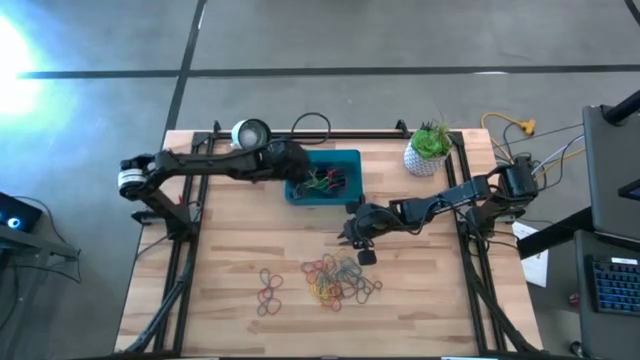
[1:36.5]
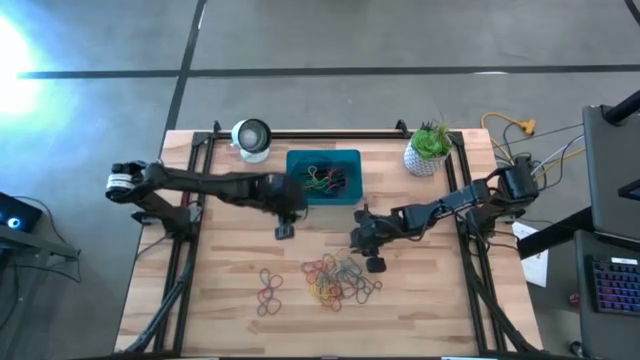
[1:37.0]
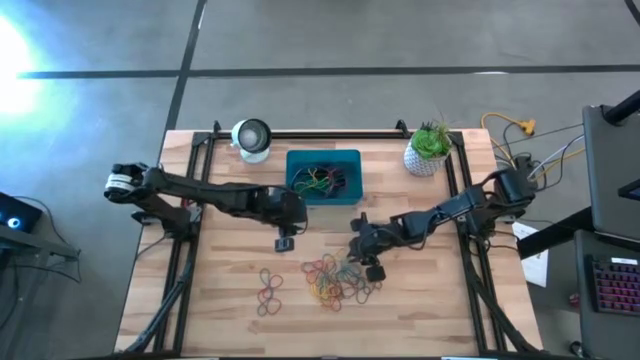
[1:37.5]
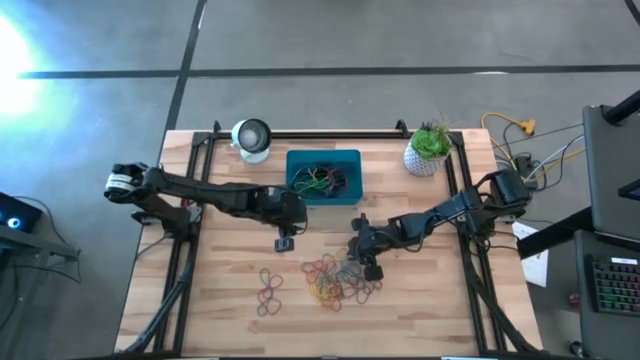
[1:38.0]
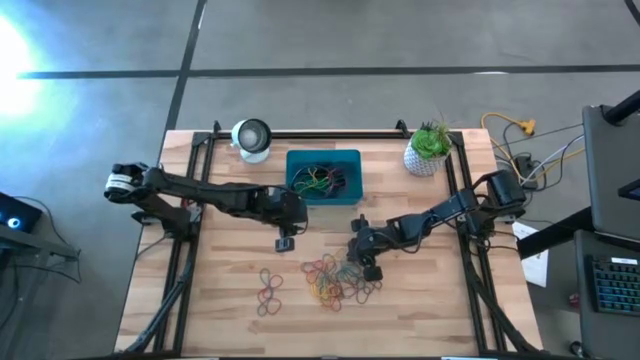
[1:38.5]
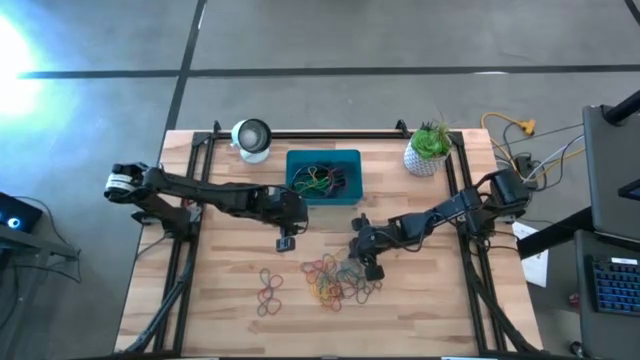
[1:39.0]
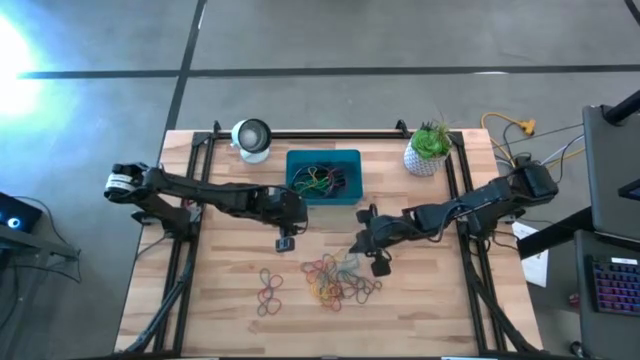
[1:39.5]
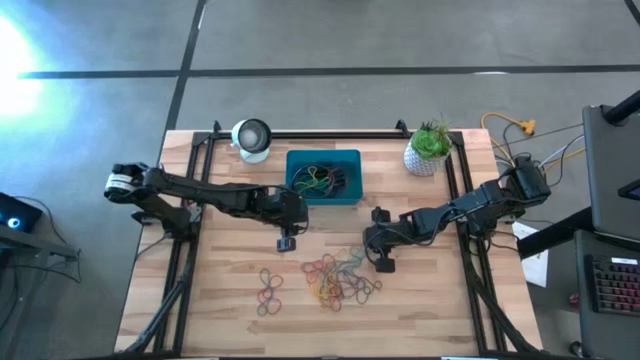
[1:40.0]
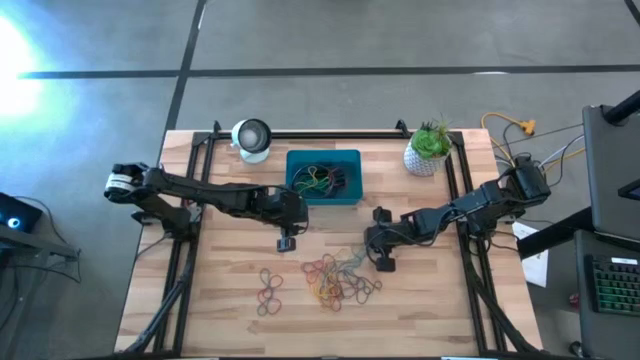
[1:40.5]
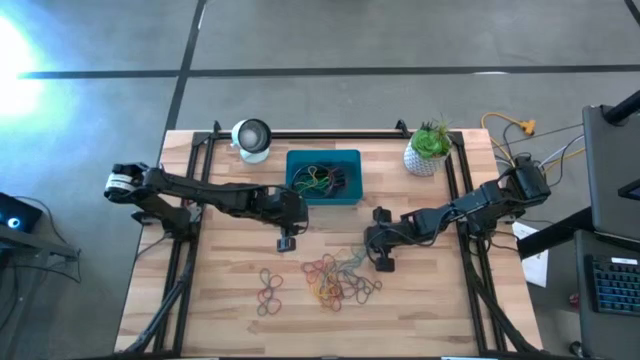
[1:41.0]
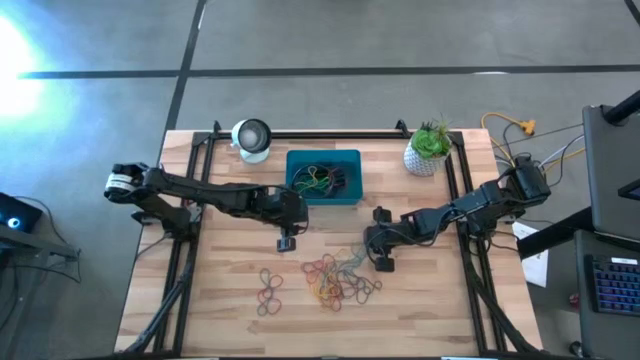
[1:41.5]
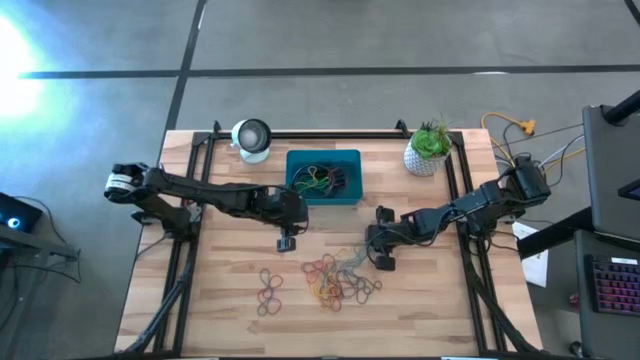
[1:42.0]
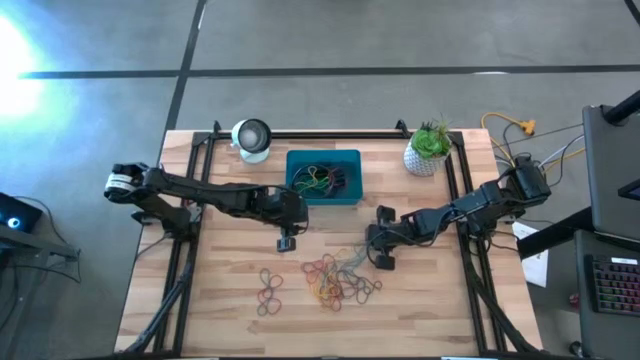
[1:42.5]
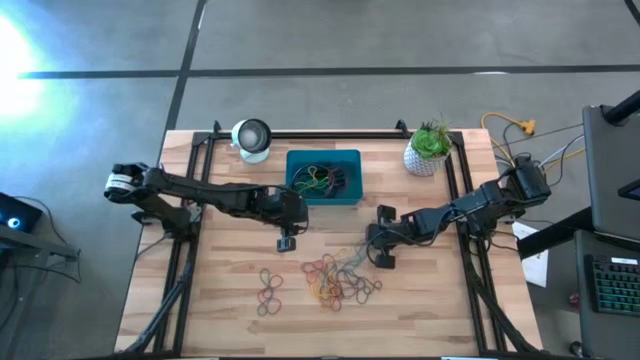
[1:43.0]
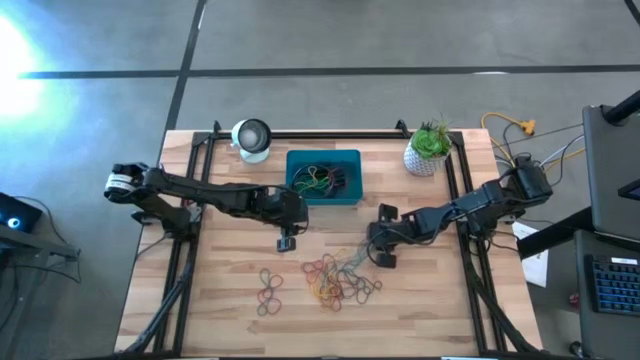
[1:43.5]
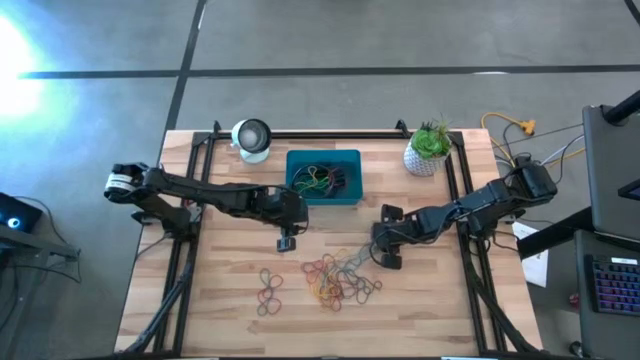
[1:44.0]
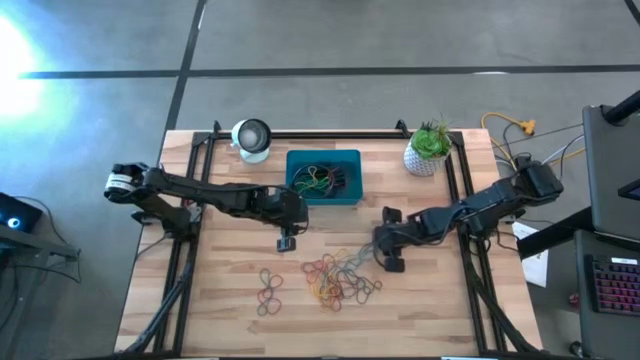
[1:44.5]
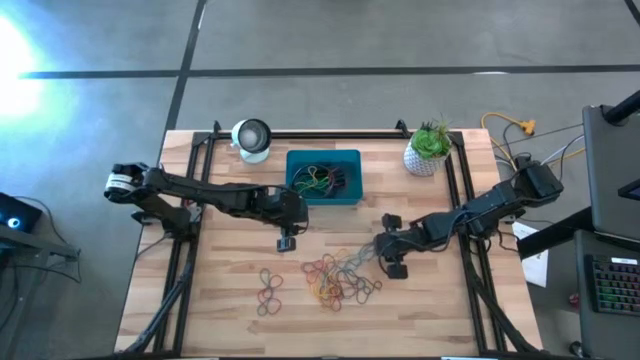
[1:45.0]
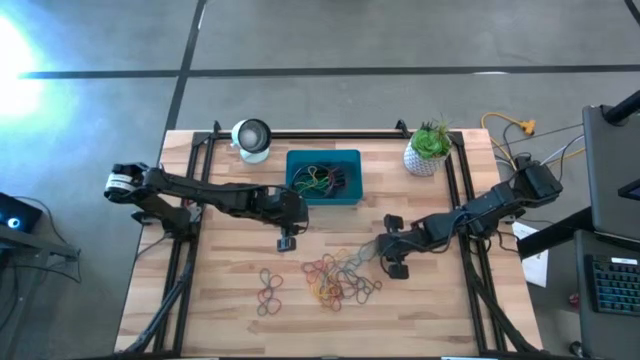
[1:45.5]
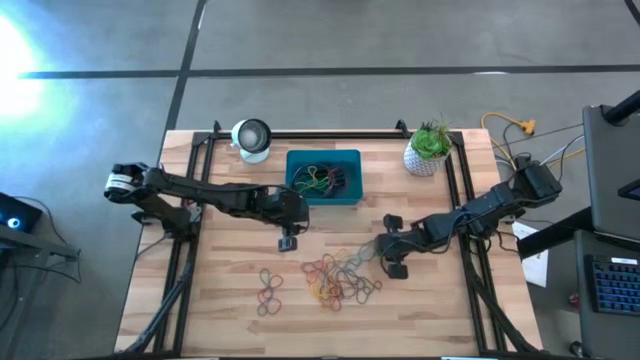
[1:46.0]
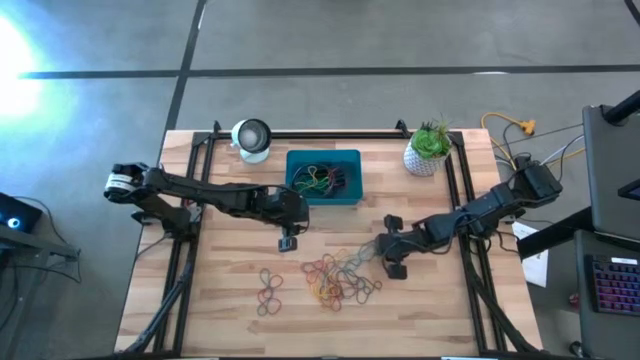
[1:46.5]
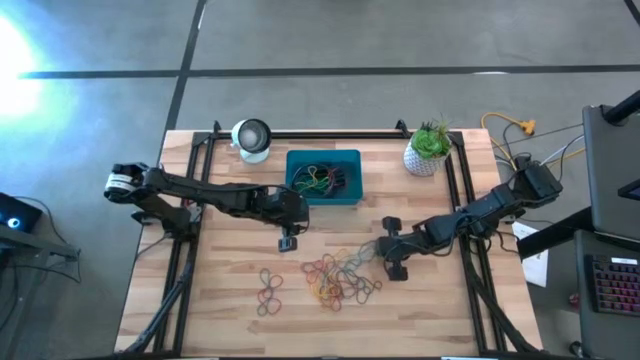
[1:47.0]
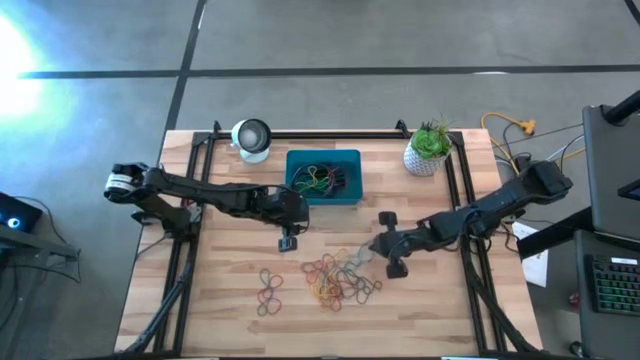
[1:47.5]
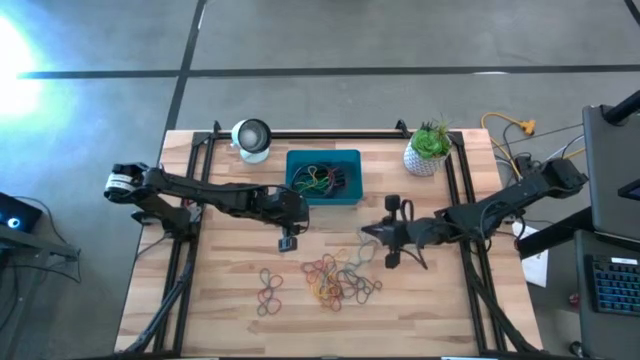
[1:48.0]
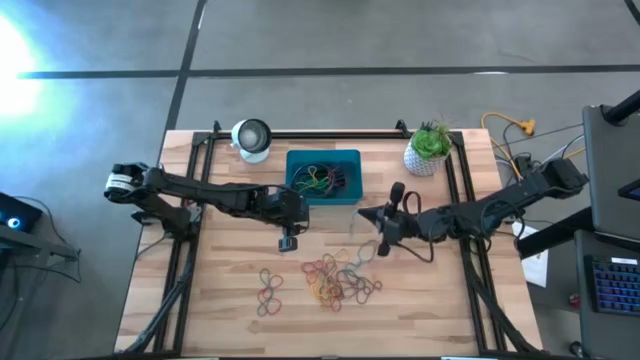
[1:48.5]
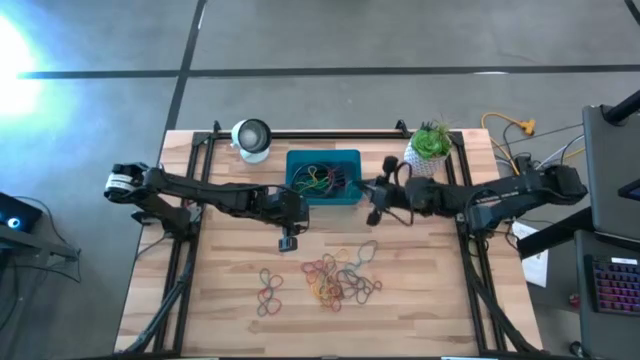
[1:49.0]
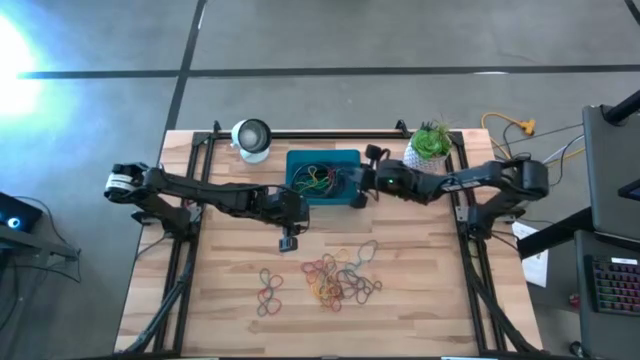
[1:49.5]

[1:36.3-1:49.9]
Task: Pick and place rubber bands into bin
Put the blue rubber band into the bin

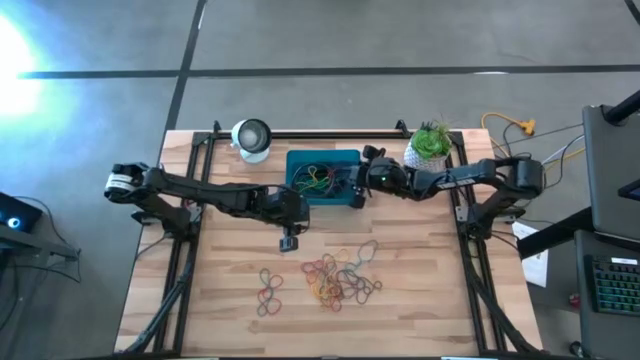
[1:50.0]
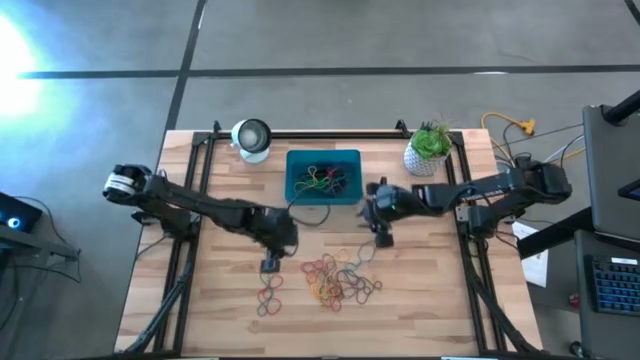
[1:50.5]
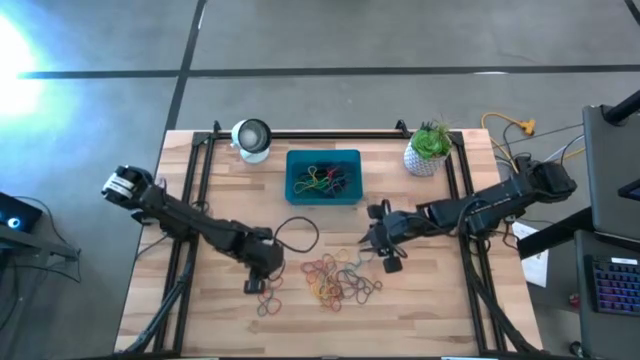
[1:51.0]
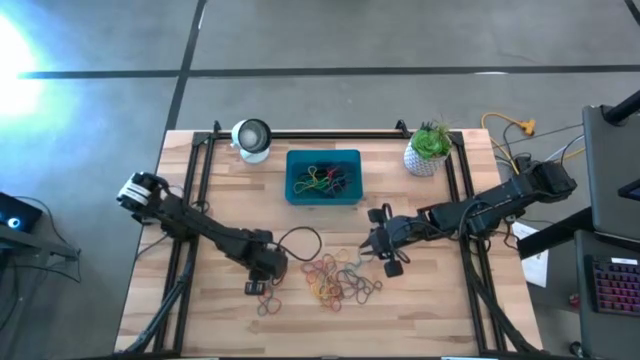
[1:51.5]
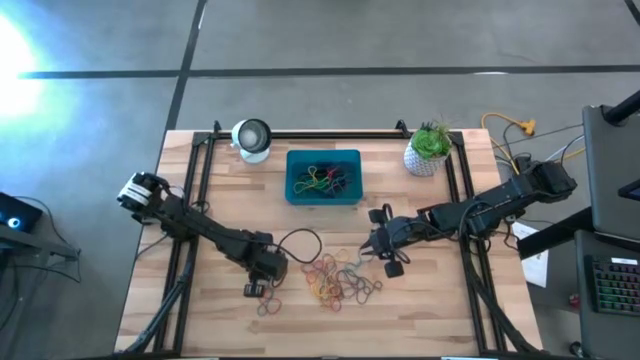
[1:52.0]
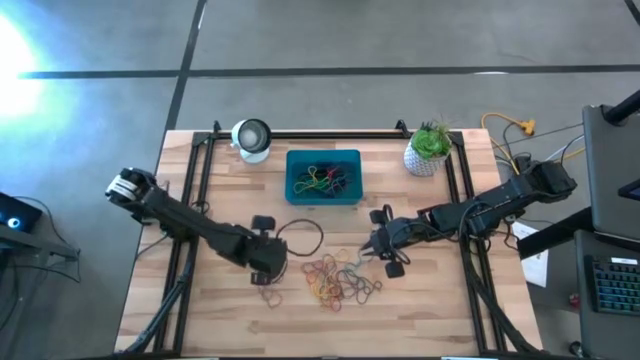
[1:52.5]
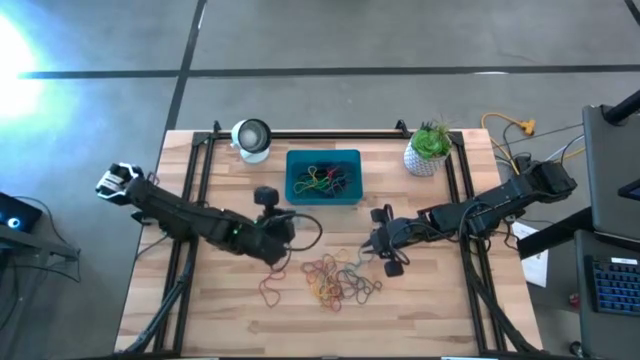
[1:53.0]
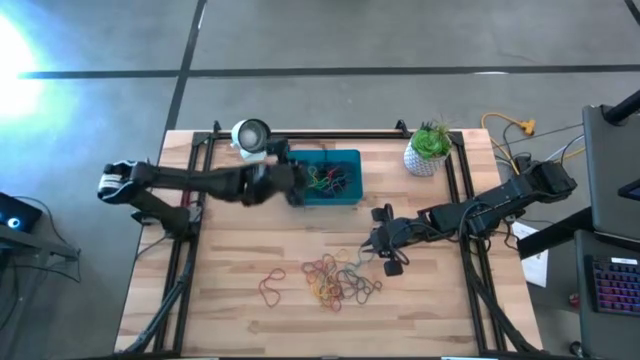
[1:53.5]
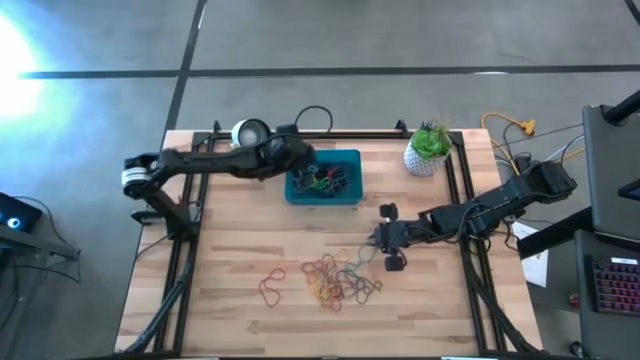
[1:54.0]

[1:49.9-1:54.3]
Put the blue rubber band into the bin

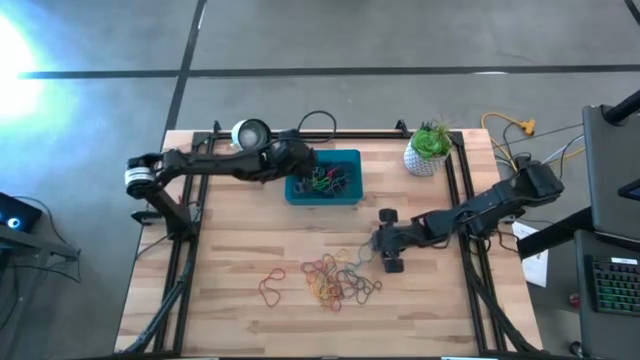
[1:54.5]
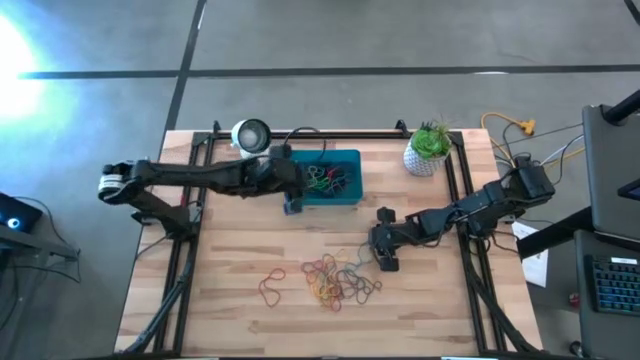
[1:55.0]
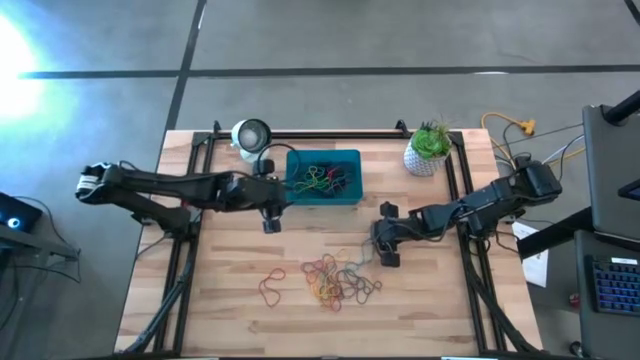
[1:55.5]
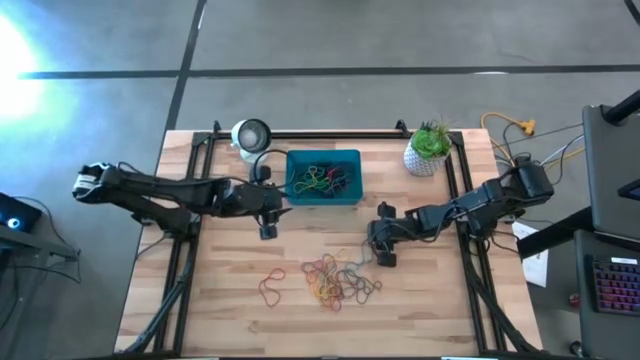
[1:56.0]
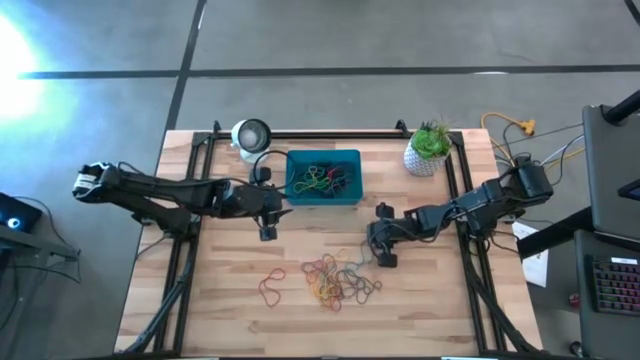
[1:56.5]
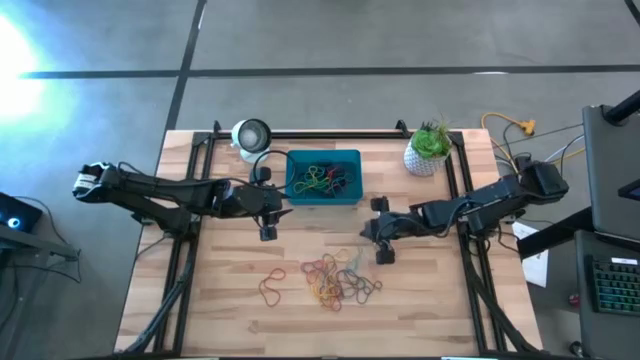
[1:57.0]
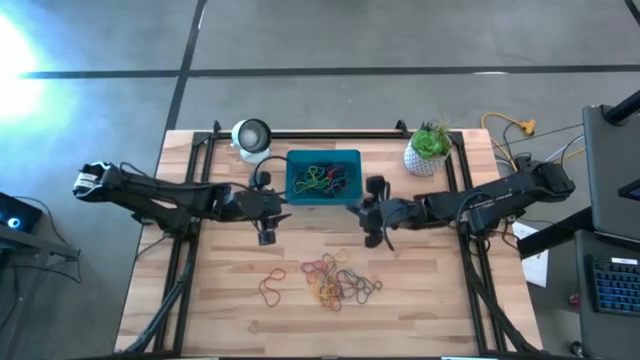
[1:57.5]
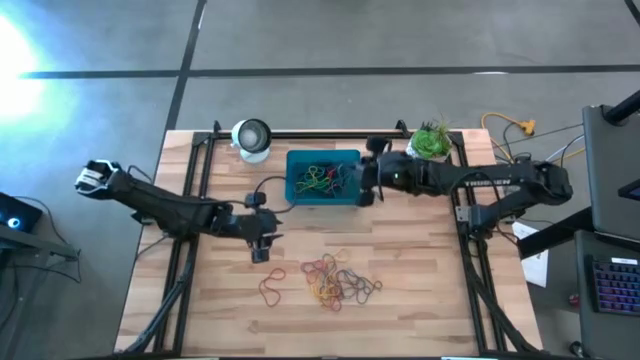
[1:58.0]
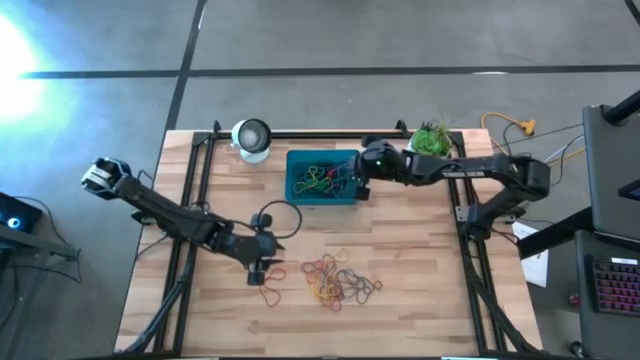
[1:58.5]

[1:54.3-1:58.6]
Put the blue rubber band into the bin
